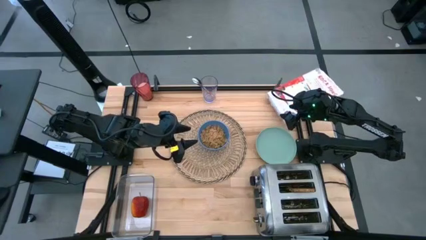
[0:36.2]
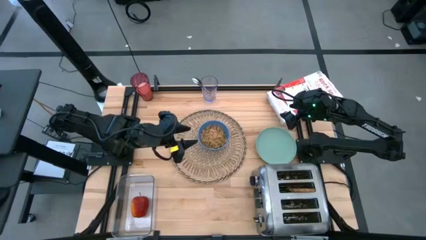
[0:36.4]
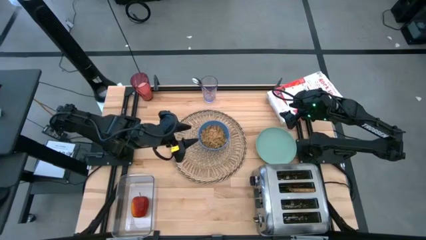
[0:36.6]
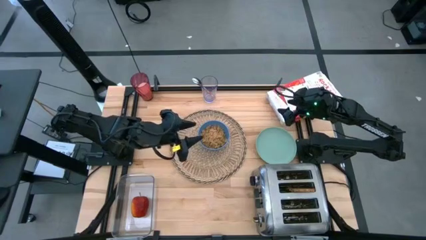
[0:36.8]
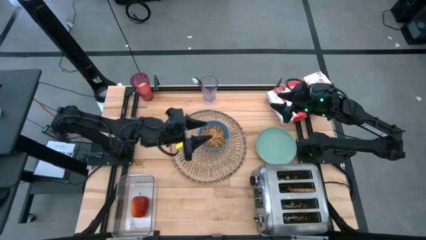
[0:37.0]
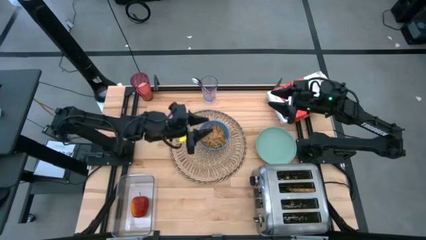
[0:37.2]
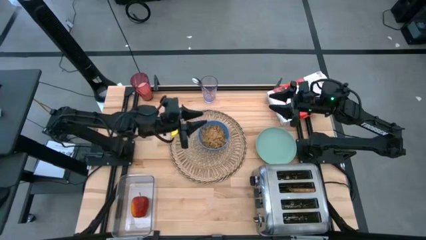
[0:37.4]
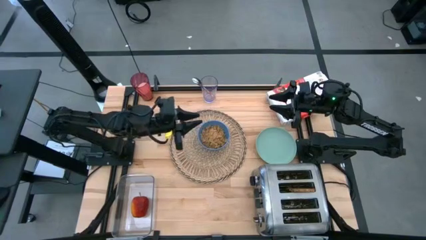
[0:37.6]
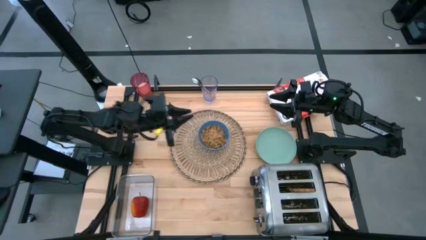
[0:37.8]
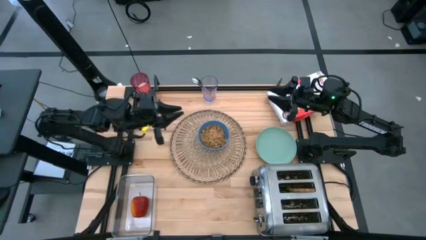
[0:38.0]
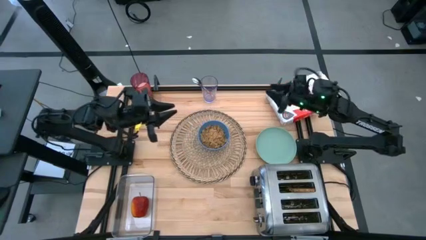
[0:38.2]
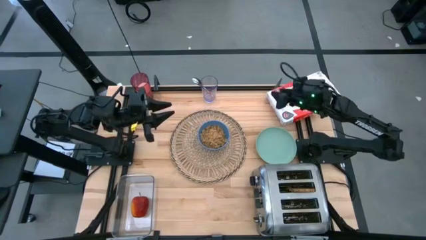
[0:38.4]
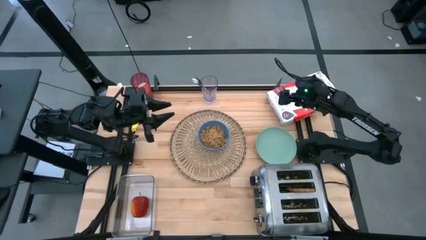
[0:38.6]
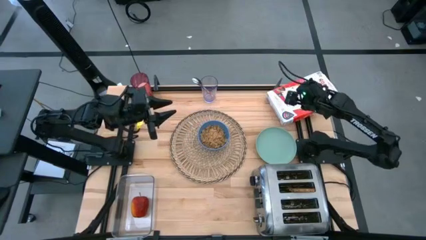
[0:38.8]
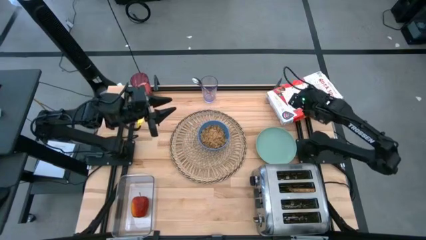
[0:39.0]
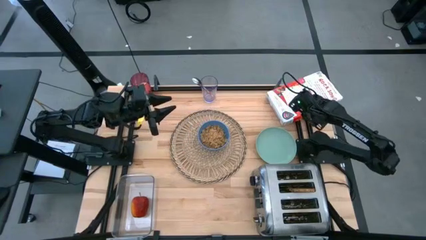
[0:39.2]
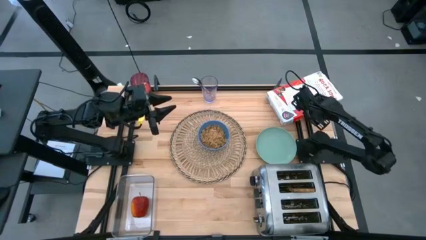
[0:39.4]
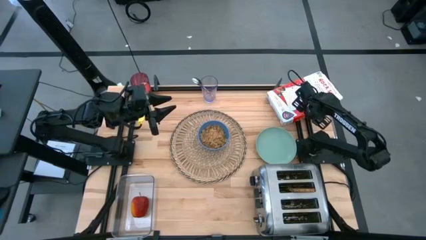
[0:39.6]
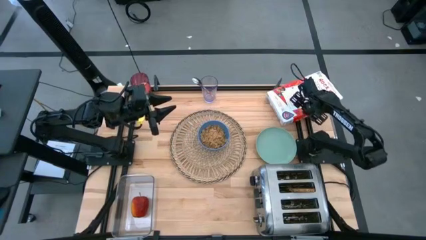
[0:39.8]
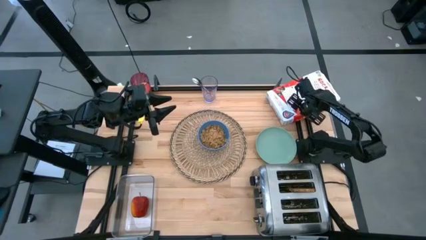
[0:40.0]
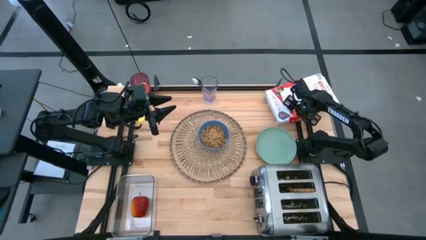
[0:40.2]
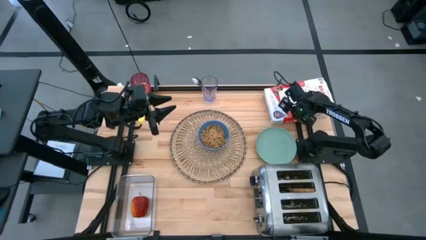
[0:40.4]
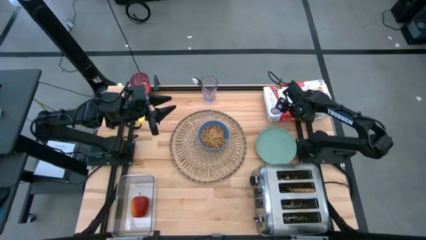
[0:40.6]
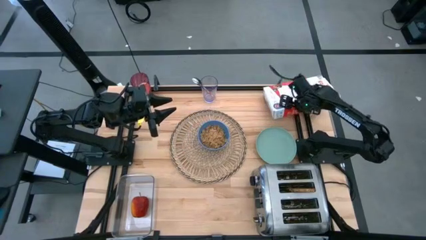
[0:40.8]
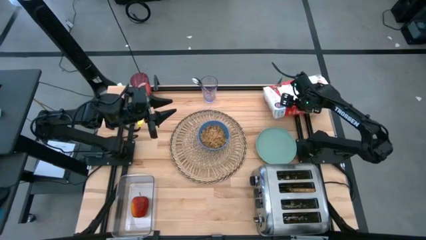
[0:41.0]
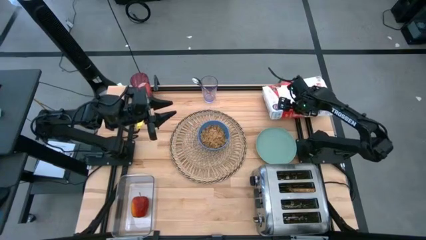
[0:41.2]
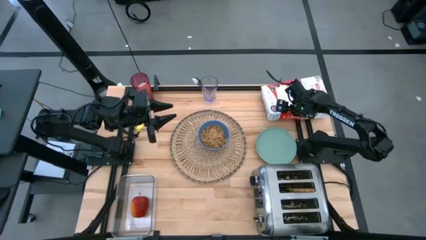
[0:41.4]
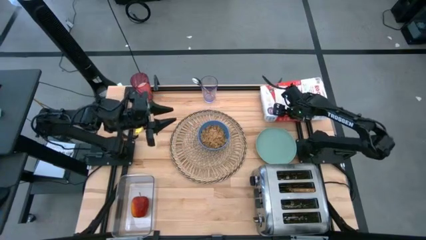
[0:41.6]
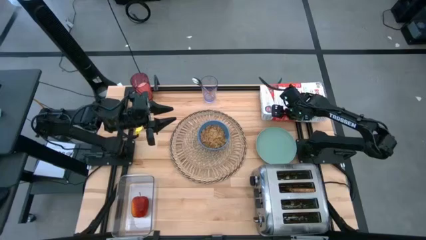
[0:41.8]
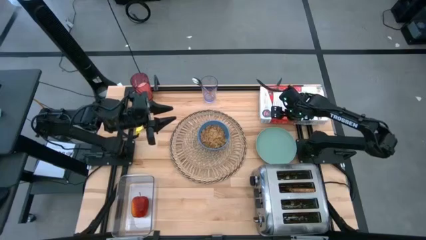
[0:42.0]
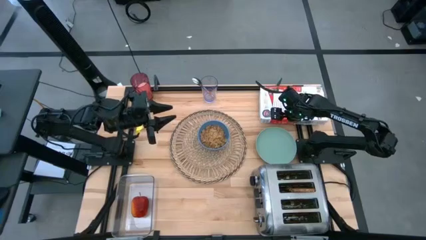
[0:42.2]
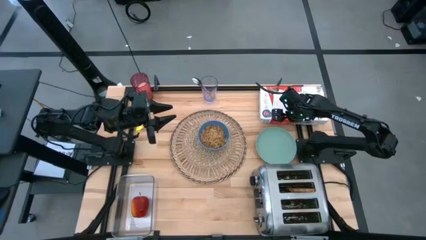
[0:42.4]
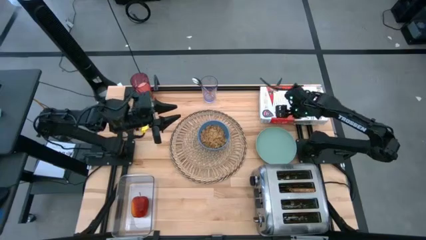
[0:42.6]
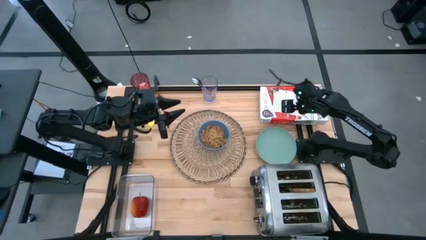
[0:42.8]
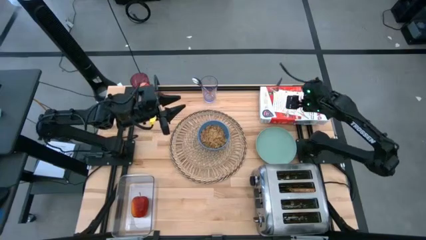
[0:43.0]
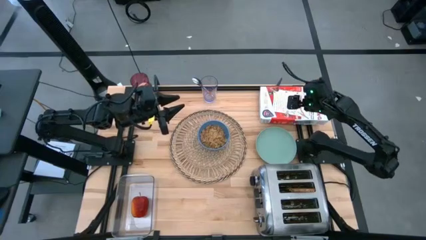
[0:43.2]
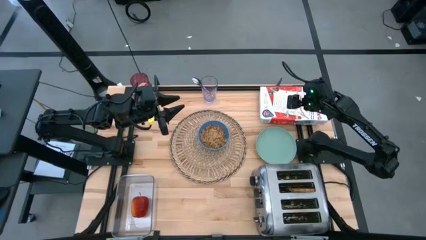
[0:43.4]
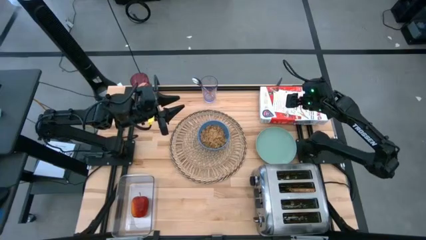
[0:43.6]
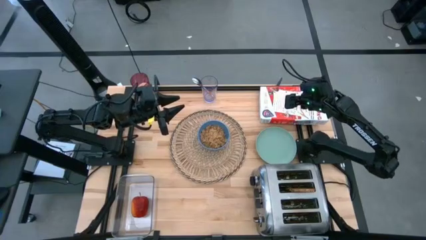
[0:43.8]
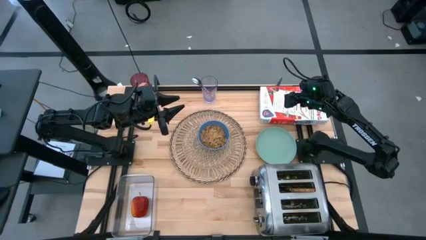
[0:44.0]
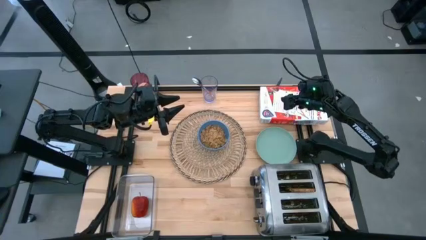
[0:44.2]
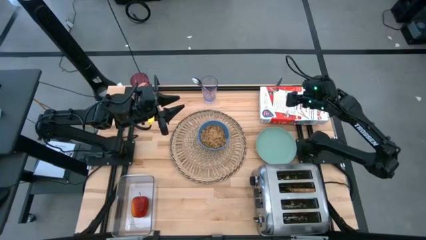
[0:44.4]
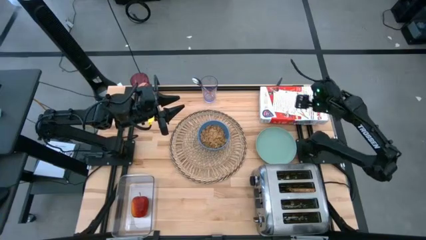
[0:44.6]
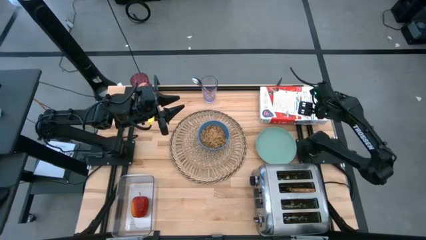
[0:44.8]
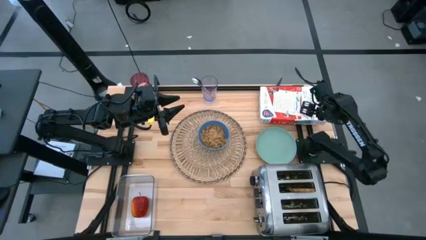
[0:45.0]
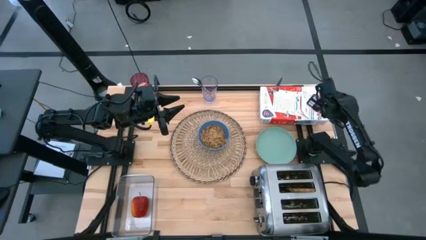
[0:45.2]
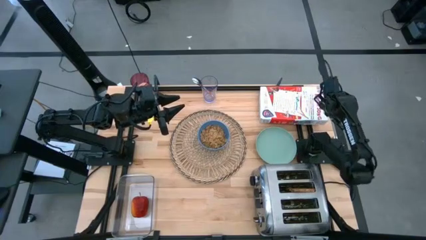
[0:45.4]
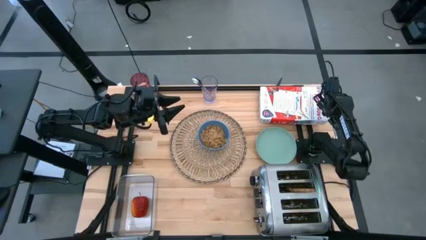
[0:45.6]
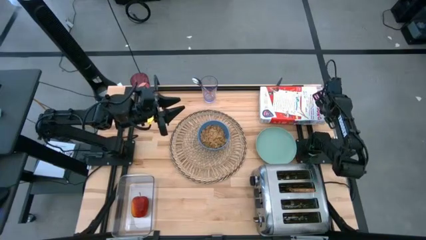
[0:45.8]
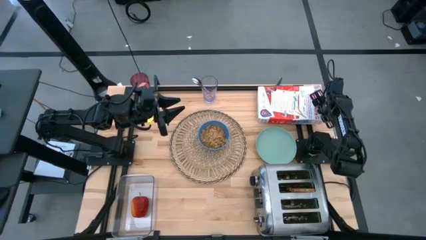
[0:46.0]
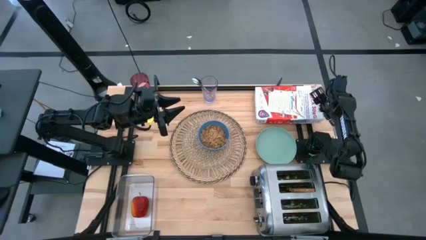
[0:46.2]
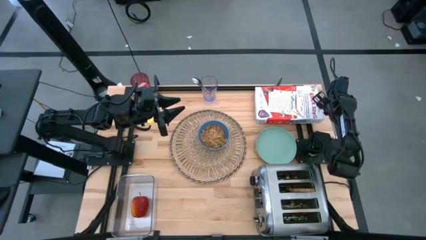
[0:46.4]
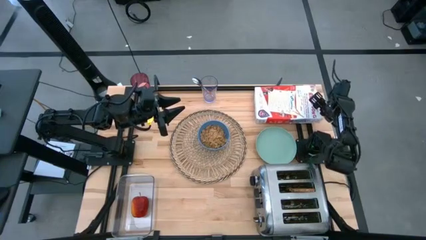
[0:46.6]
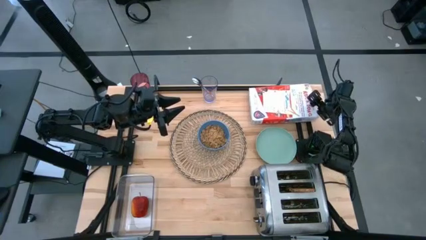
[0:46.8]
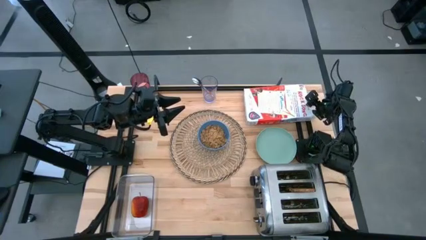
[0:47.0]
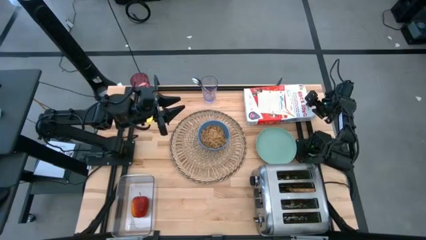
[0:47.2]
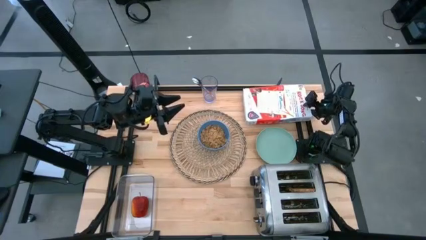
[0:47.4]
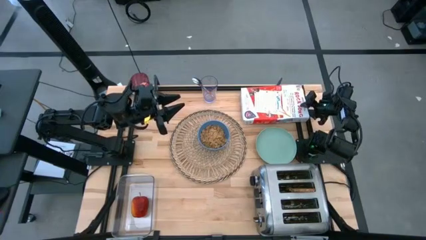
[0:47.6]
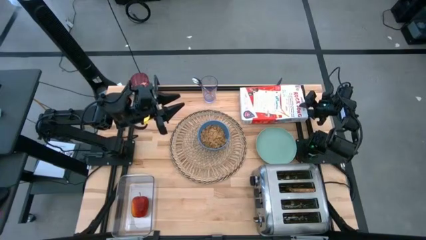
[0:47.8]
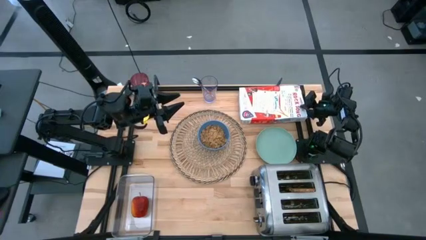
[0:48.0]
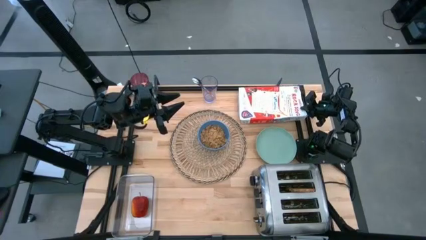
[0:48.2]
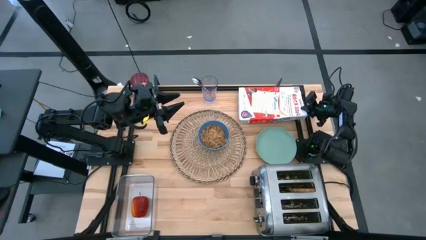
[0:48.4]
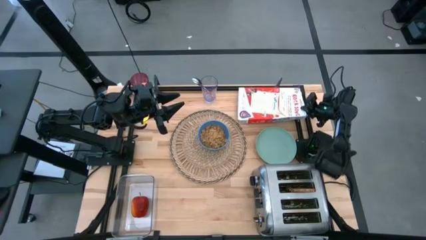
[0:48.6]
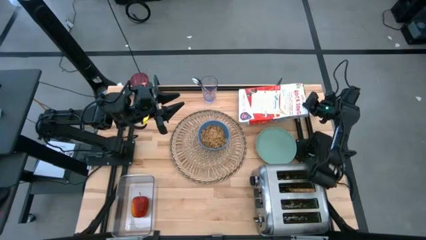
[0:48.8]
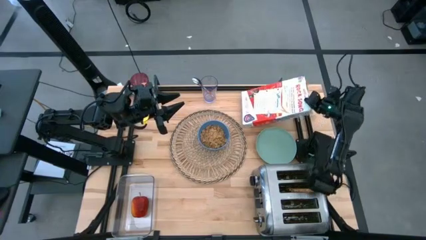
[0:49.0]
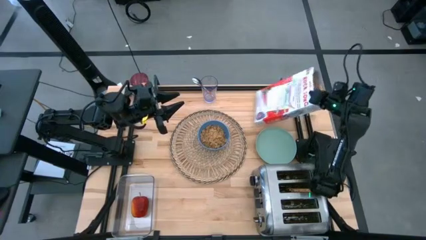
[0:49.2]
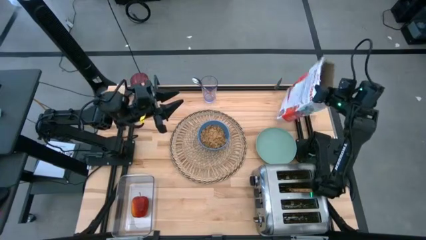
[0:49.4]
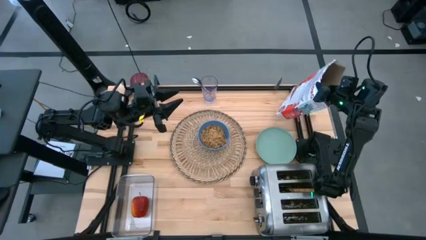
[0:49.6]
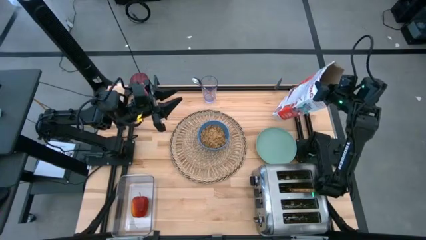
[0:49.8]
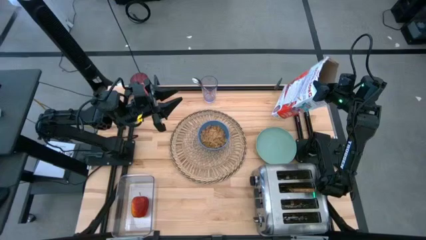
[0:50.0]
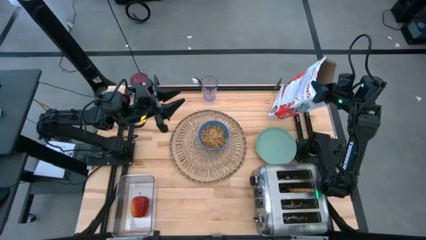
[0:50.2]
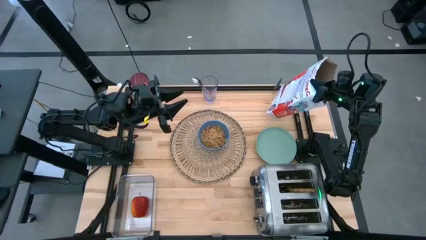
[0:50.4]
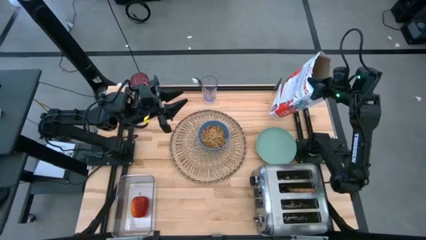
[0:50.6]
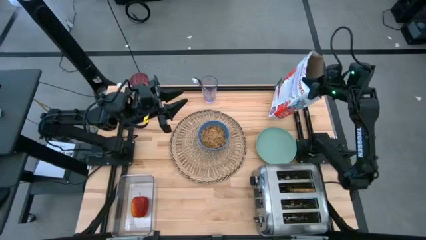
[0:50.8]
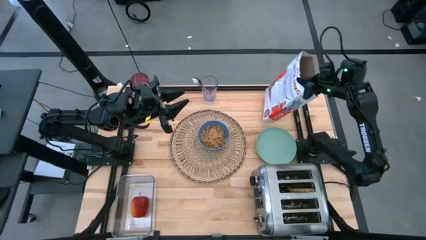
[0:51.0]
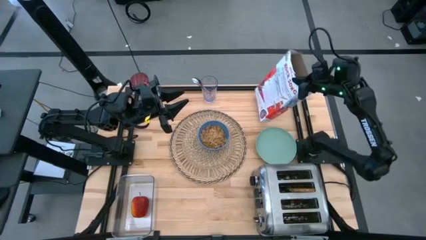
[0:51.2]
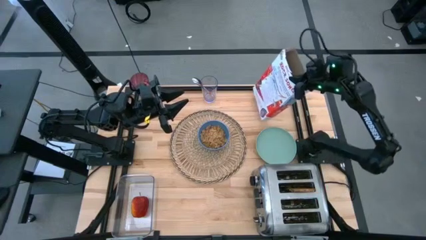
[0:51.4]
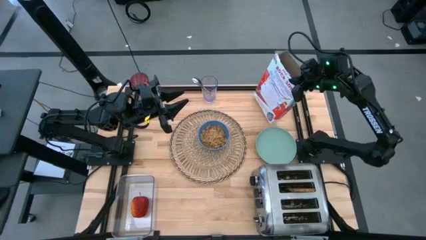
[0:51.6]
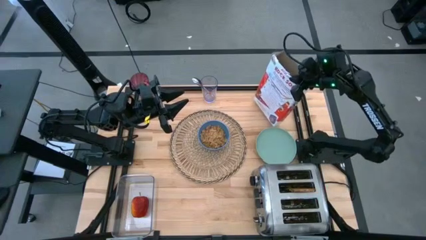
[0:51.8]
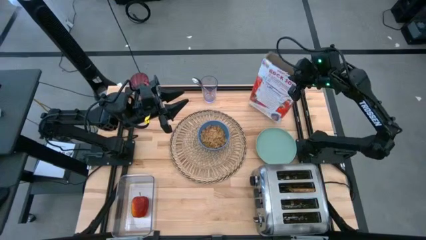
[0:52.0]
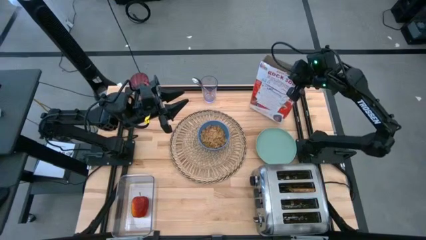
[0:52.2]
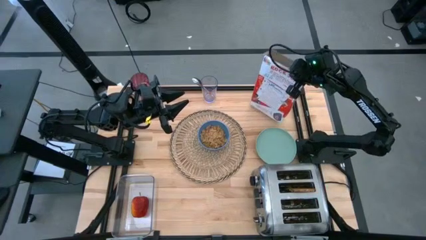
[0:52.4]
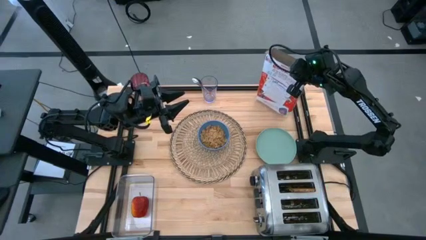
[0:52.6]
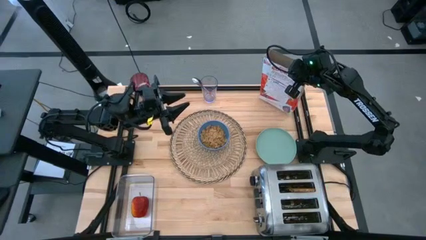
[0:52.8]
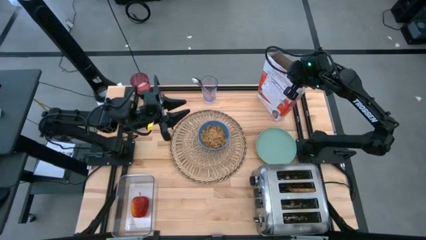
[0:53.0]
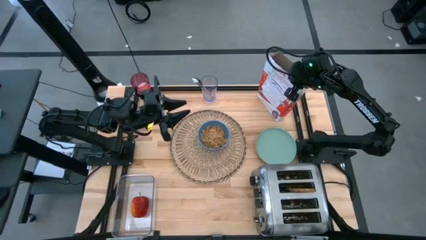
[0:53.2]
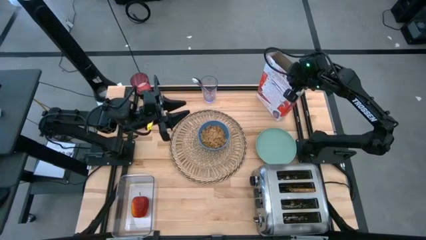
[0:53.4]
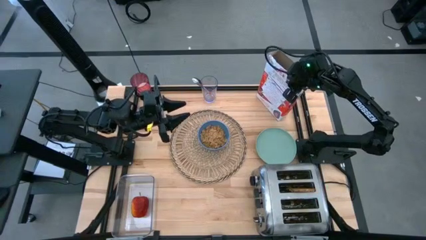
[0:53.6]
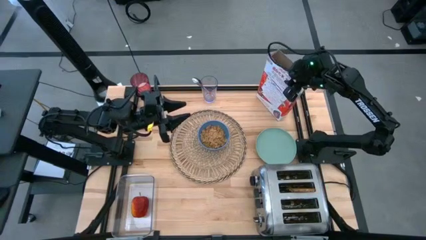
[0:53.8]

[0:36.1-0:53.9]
Task: Arrange a breakfast setting
Pour the cereal from the white cereal box into the blue bowl
